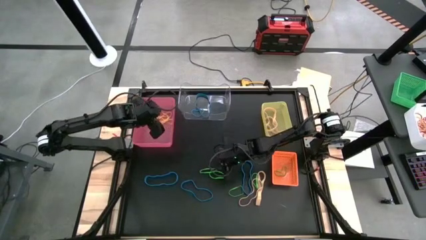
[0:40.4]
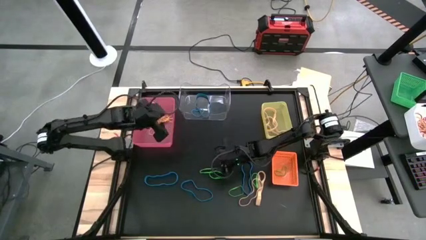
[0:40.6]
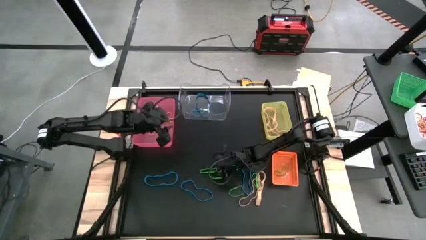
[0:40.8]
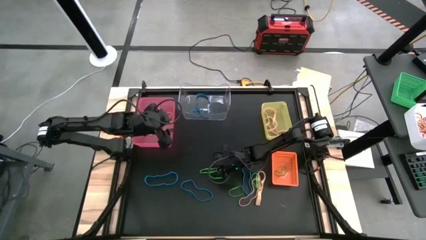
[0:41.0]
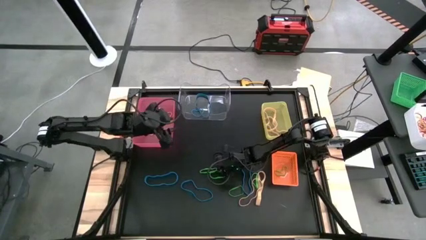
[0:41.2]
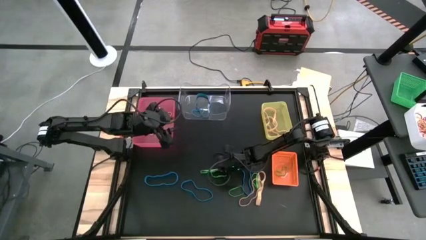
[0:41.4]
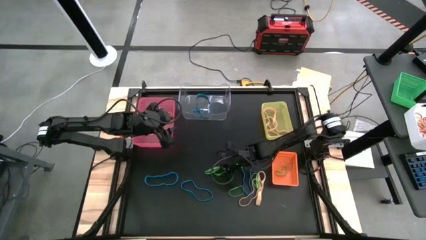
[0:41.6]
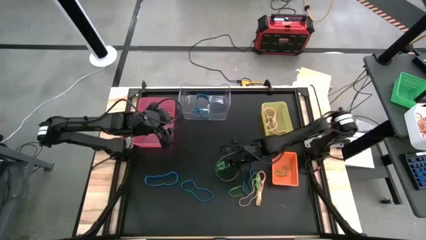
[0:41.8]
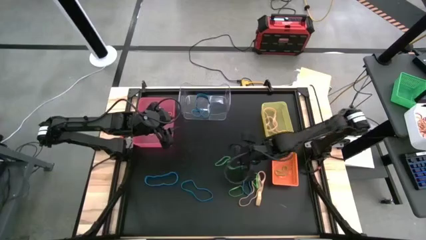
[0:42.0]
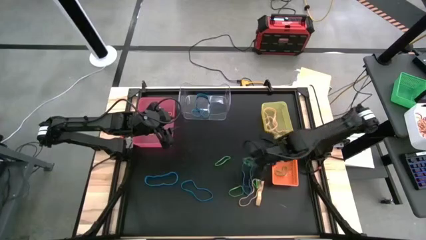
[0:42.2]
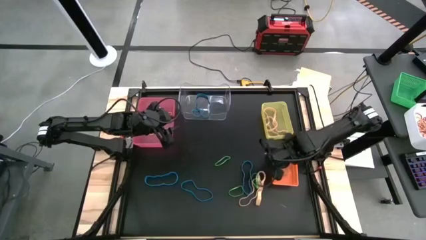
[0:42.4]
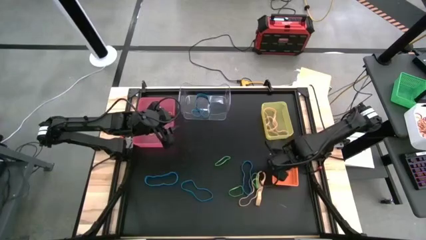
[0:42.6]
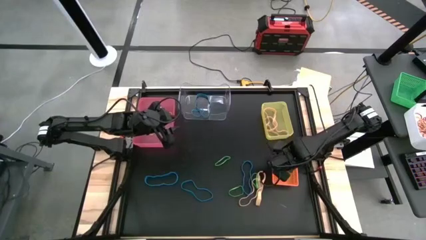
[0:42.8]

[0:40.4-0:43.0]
Task: Sort rubber bands into baskets
Put the green rubber band into the orange bin

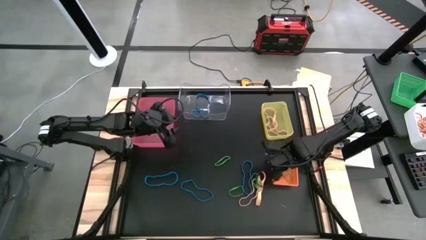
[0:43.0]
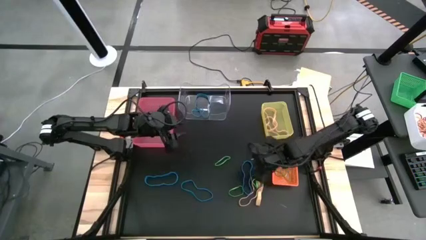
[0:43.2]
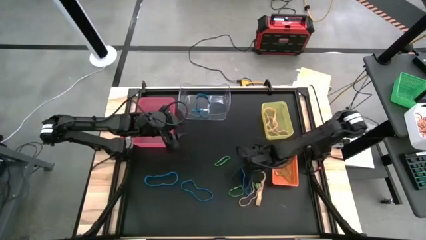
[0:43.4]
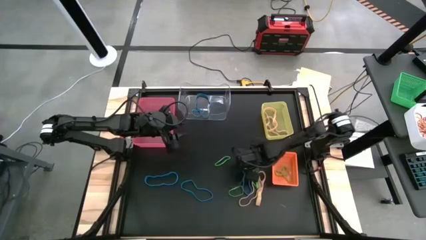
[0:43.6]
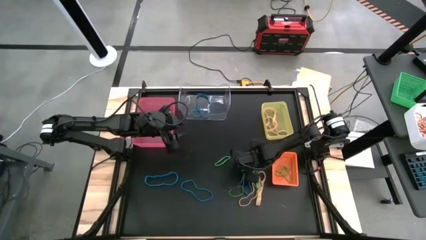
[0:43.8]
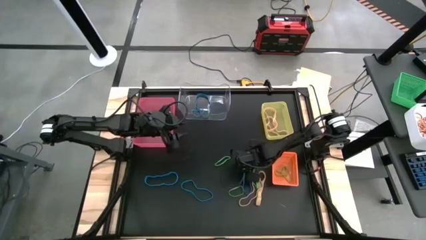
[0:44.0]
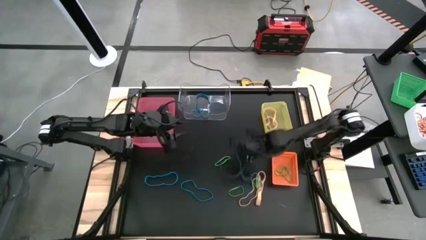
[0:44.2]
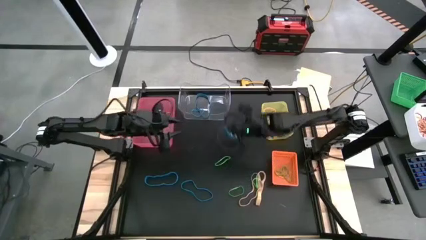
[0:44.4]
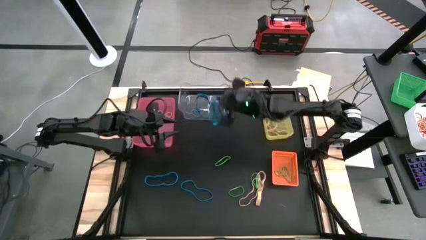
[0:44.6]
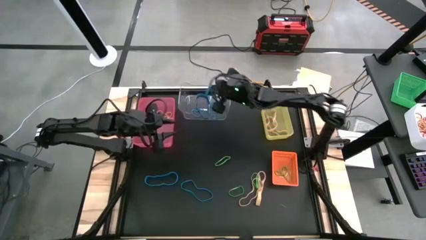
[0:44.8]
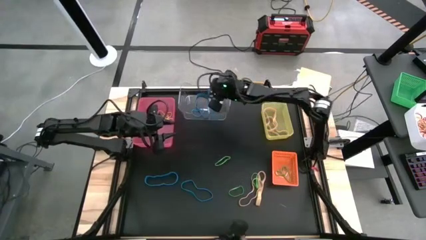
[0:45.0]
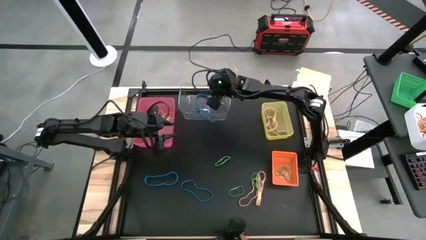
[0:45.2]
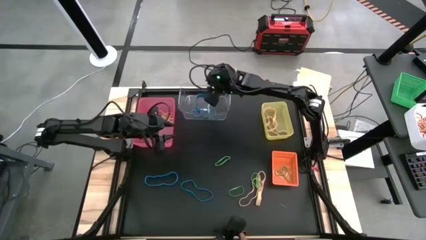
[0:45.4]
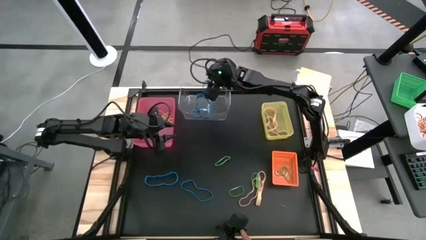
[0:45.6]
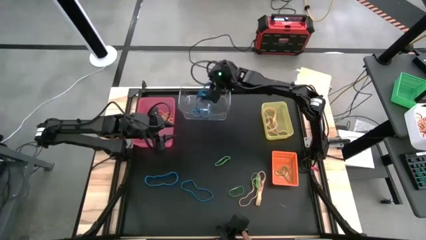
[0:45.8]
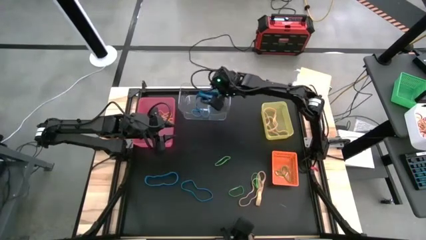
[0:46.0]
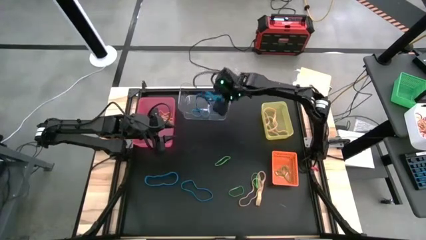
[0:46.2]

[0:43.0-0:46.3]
Put the blue rubber band into the transparent bin

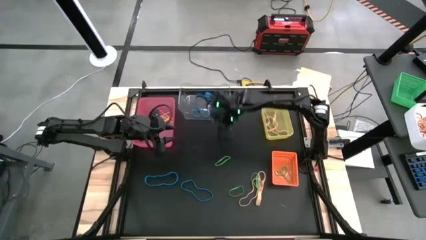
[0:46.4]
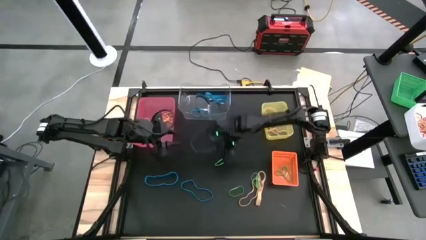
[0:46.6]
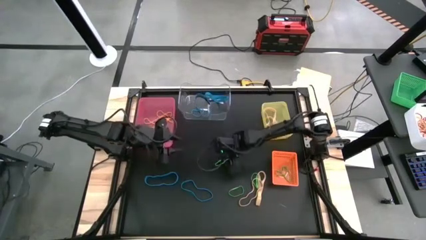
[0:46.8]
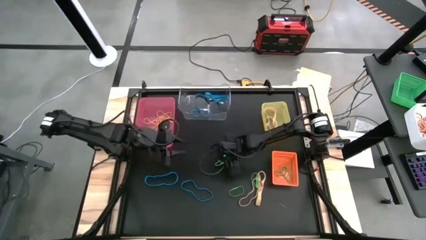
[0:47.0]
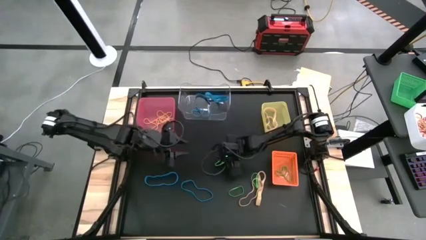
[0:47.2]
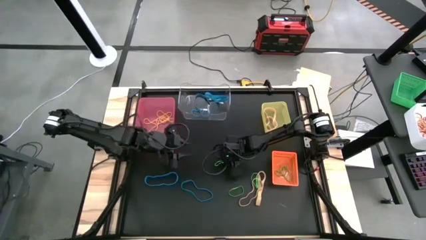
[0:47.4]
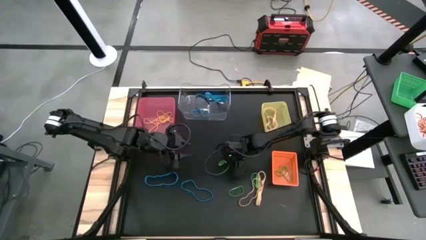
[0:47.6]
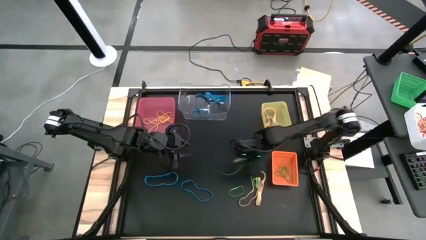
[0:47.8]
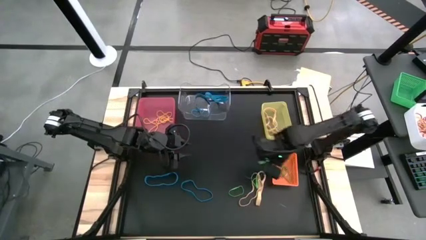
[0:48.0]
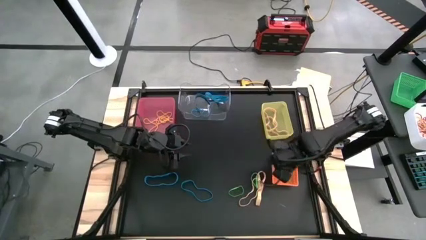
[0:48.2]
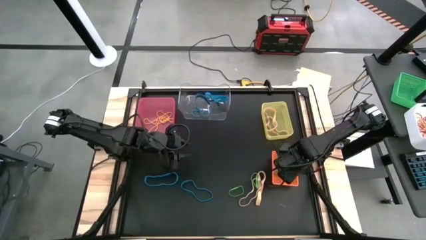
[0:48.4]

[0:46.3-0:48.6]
Put the green rubber band into the orange bin

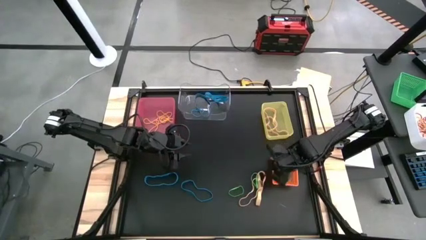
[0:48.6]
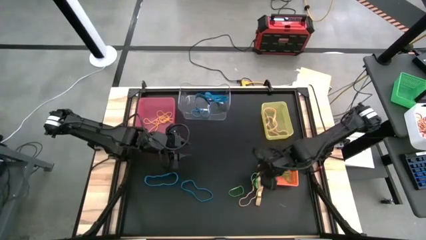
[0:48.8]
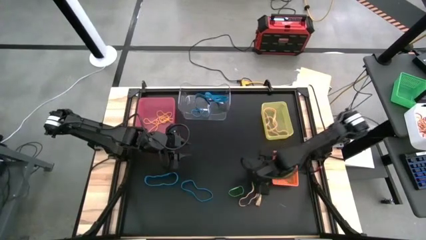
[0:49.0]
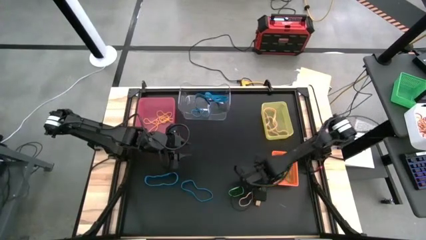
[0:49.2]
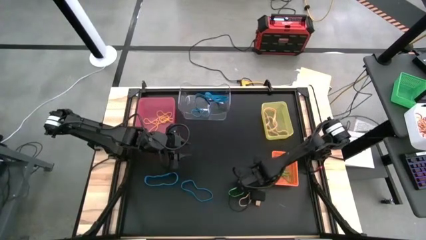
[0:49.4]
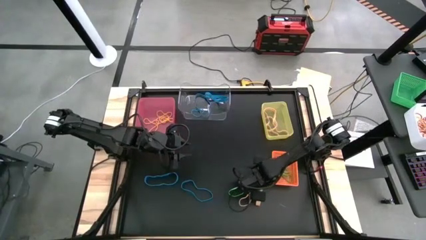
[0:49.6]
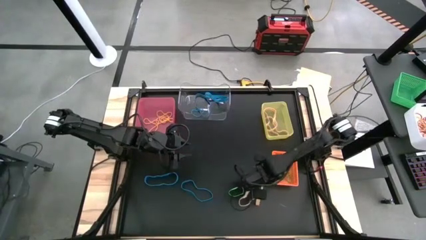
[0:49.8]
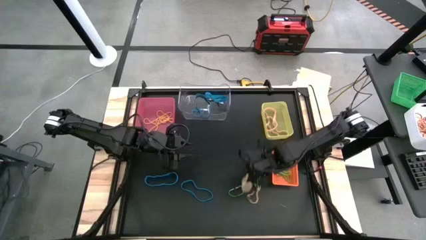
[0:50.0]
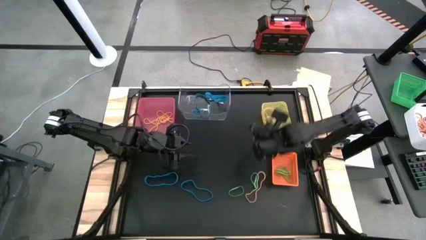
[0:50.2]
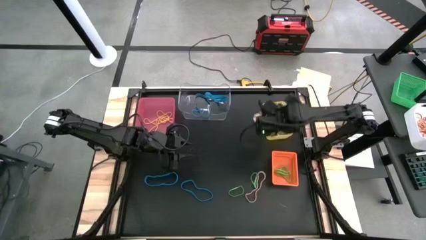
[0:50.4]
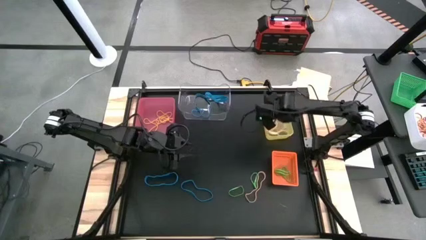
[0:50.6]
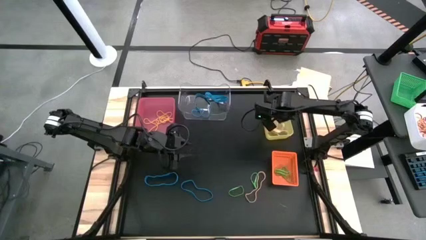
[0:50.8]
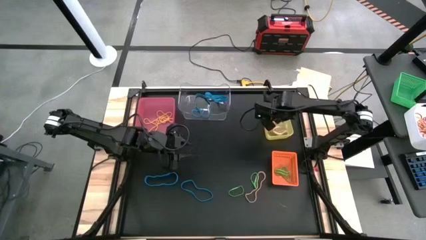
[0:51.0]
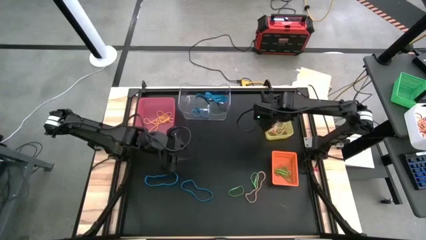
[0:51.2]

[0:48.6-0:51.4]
Put the light orange rubber band into the yellow bin

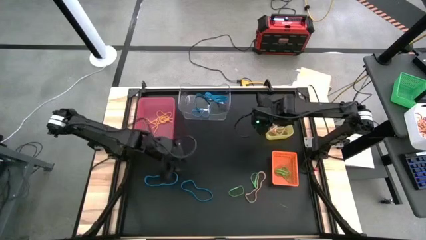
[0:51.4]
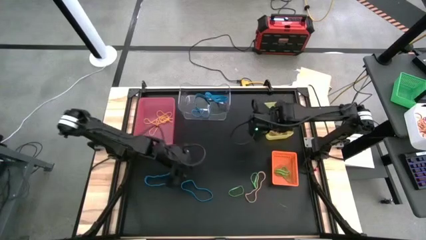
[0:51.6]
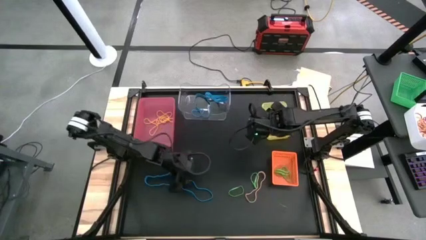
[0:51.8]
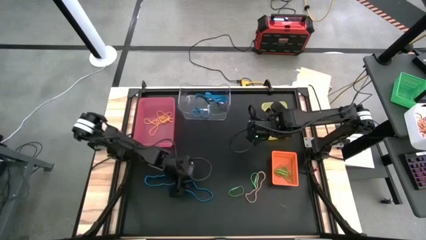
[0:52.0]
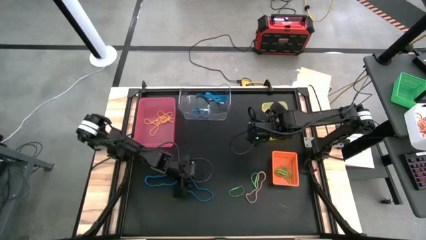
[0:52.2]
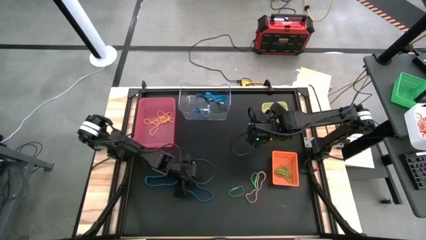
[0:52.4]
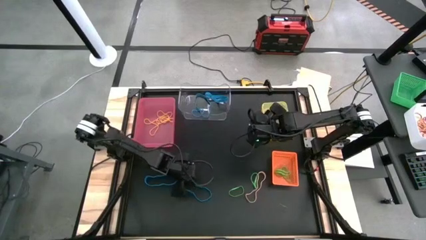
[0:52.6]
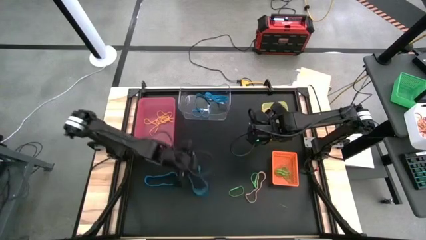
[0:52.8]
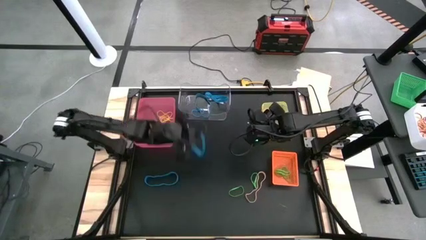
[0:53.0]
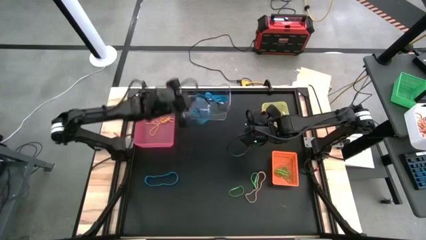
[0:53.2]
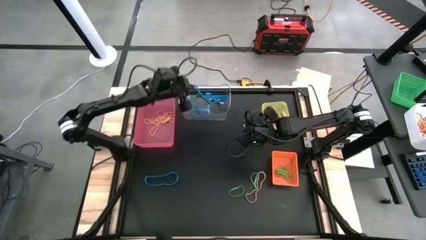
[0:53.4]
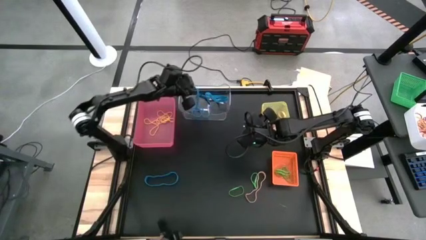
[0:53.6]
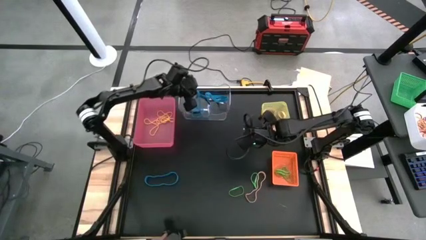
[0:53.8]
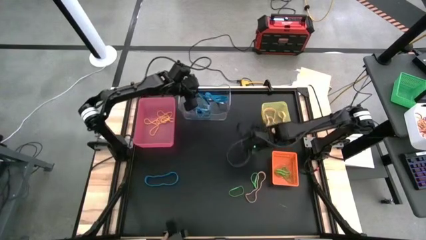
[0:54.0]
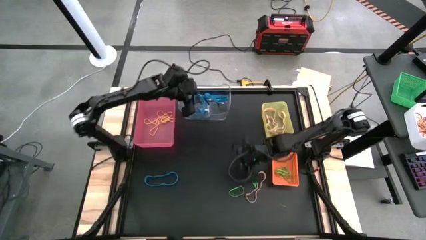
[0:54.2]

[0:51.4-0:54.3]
Put the blue rubber band into the transparent bin

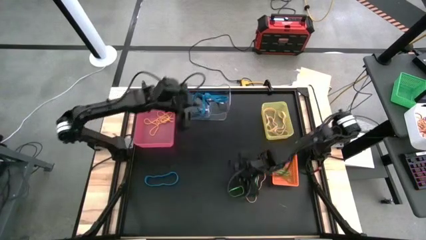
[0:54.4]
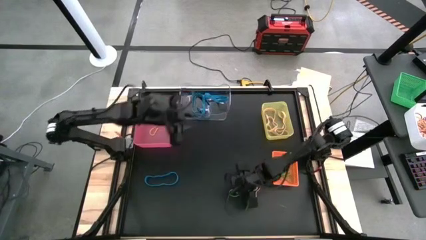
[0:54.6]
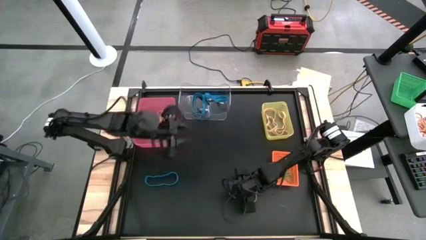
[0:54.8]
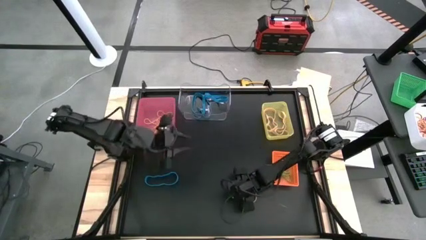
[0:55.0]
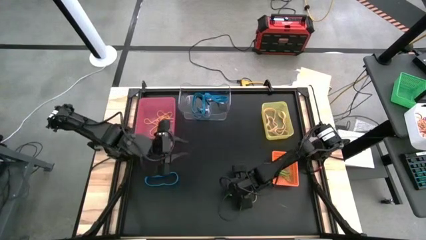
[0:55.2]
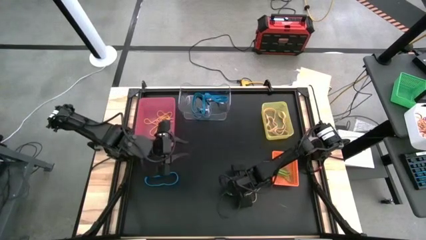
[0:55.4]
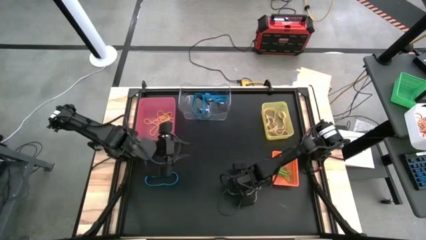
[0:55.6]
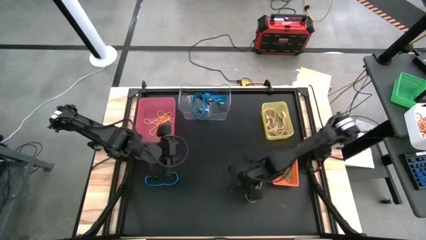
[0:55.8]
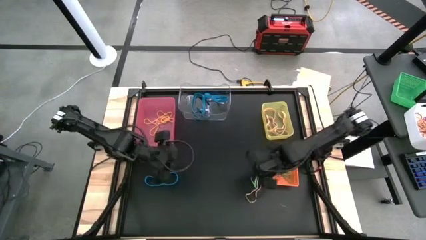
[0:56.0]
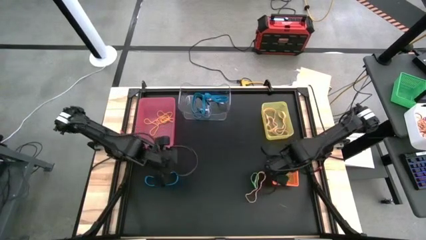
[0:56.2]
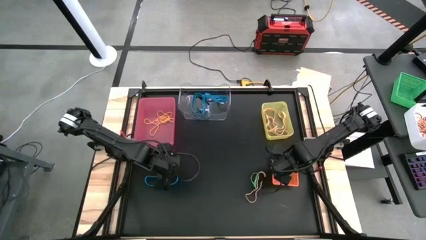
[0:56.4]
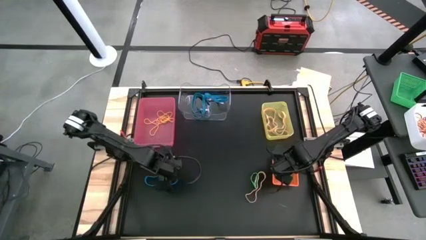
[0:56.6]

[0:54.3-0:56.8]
Put the green rubber band into the orange bin

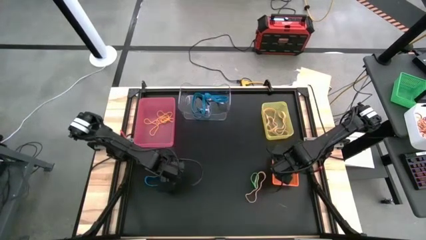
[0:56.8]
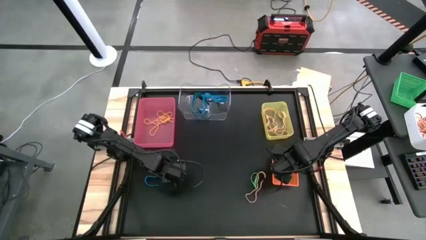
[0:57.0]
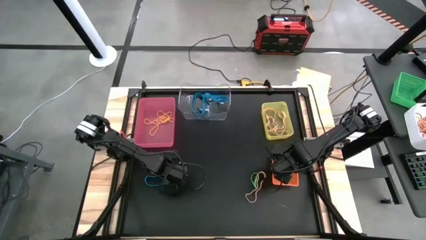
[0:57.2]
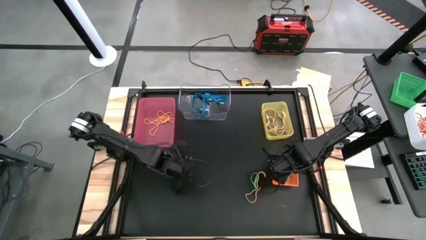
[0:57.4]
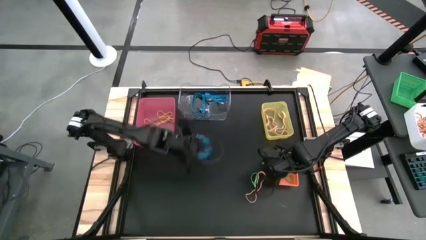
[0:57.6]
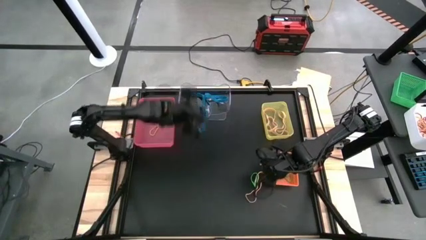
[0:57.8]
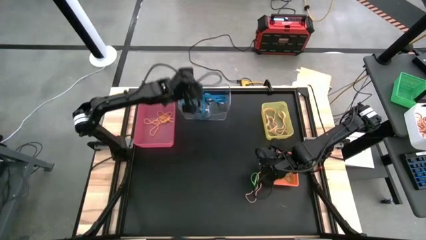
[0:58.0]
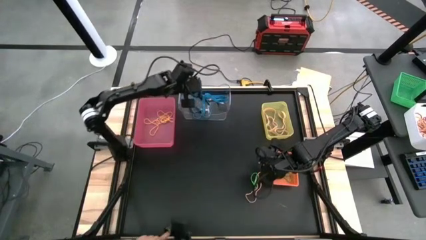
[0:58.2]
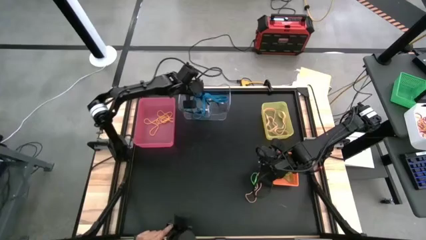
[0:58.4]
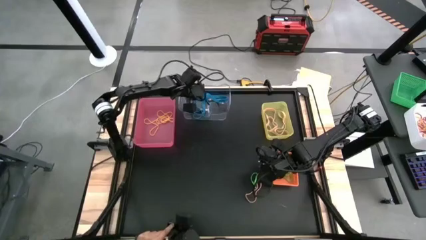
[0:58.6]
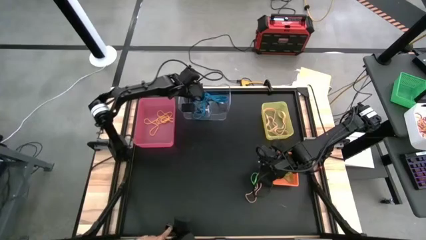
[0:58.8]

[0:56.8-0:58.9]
Put the blue rubber band into the transparent bin
